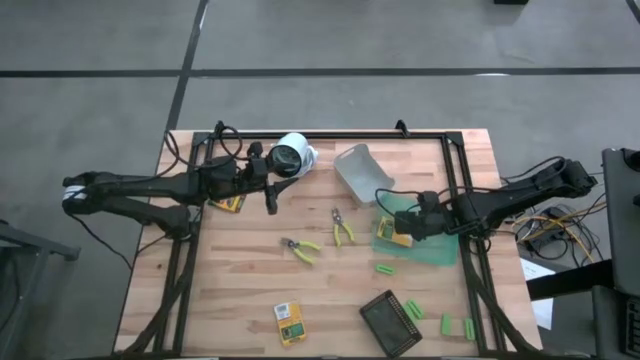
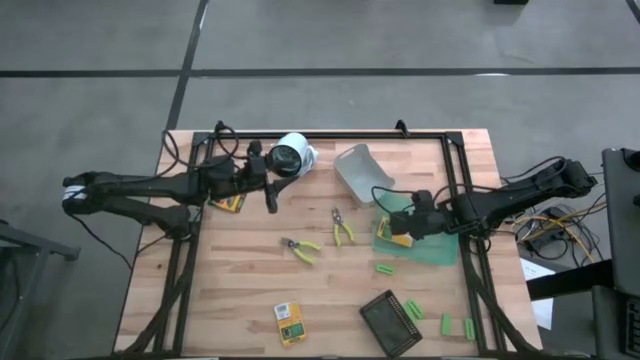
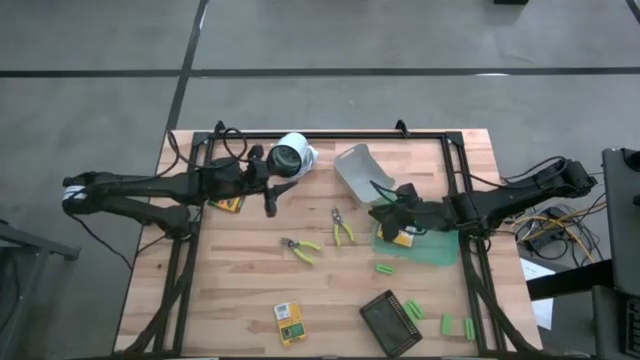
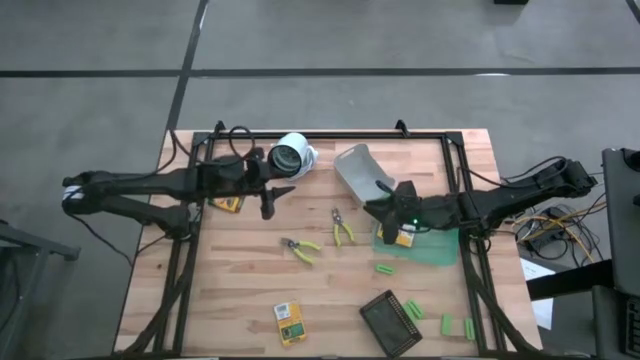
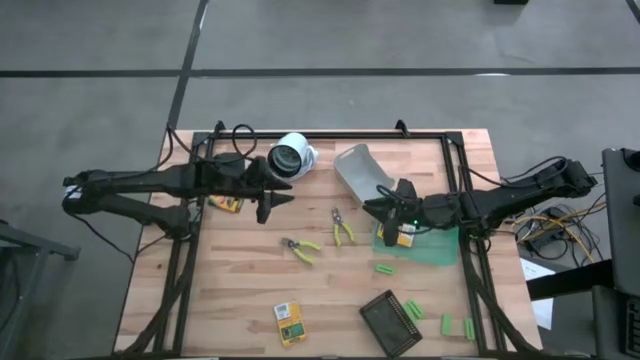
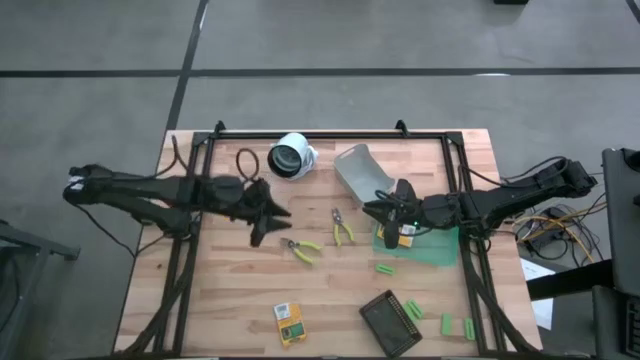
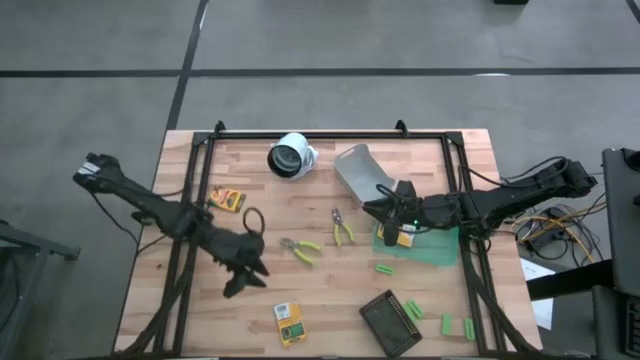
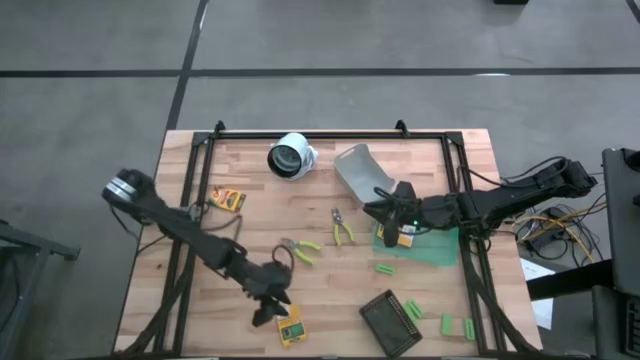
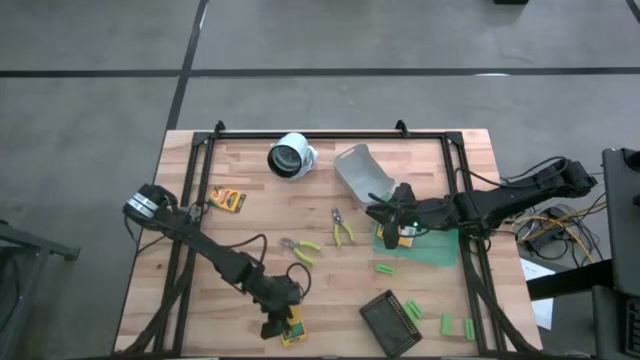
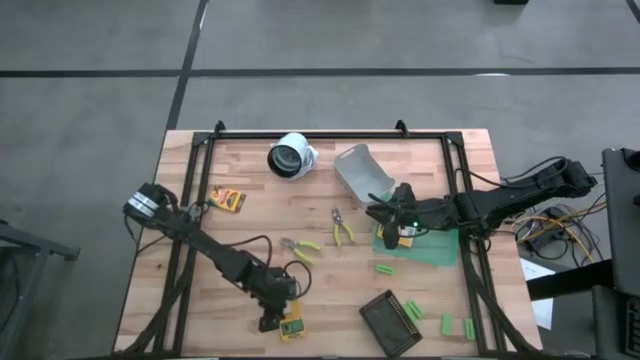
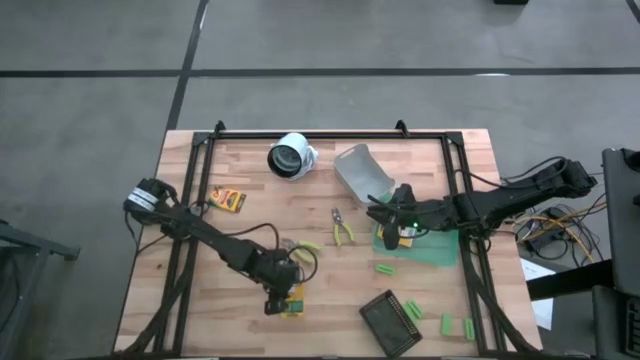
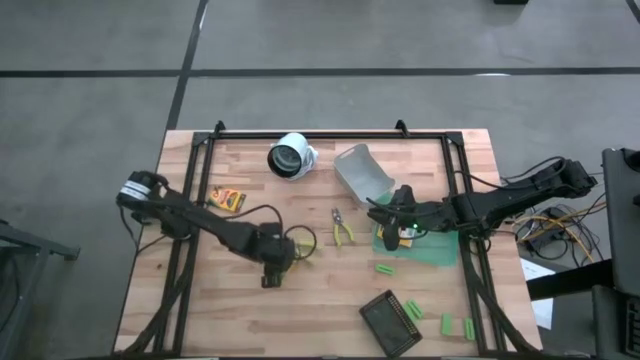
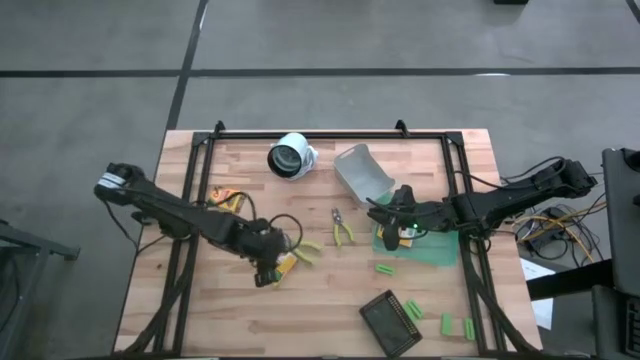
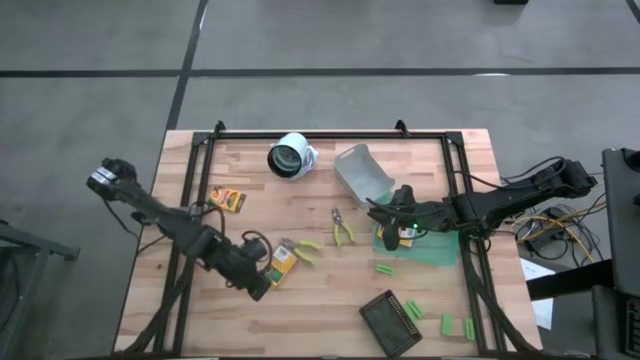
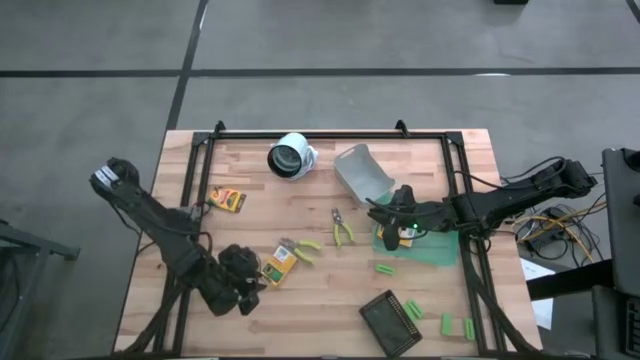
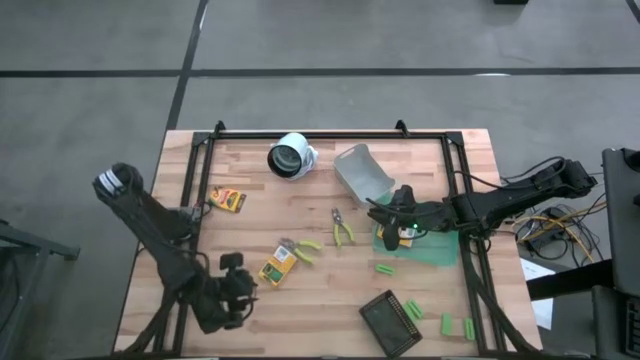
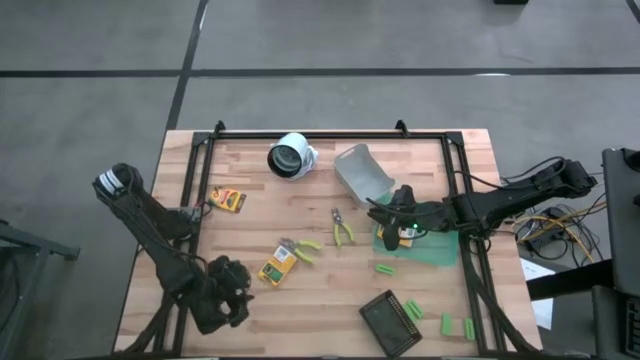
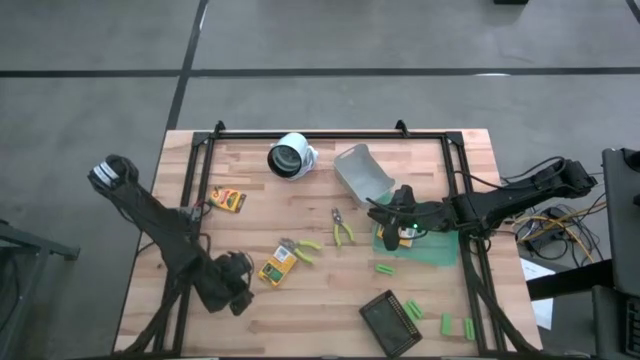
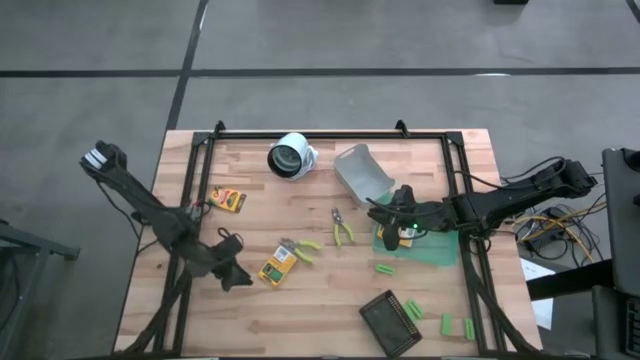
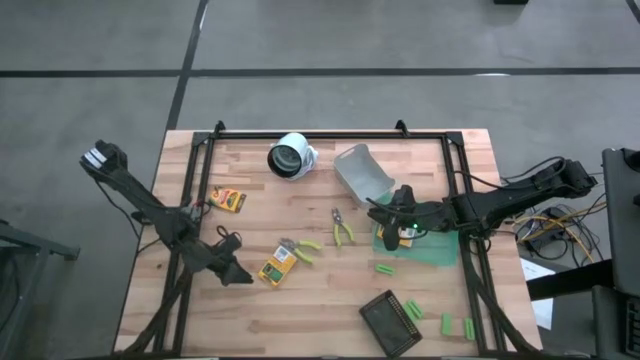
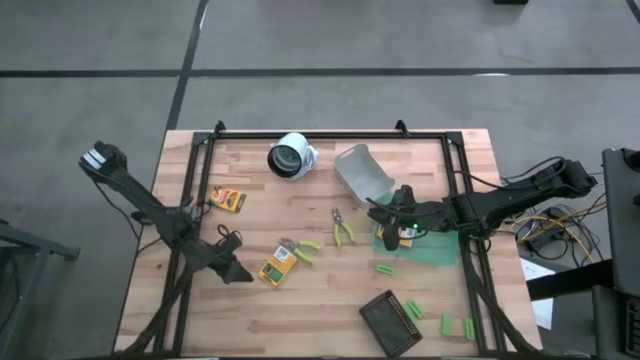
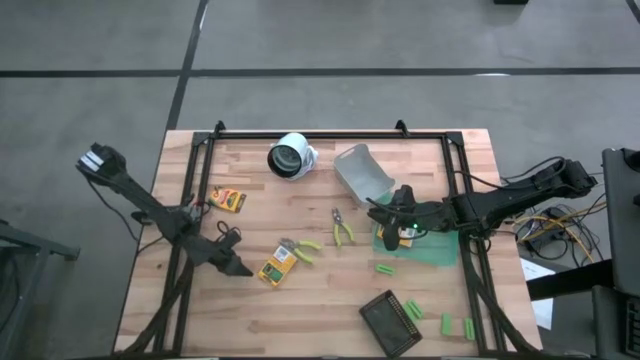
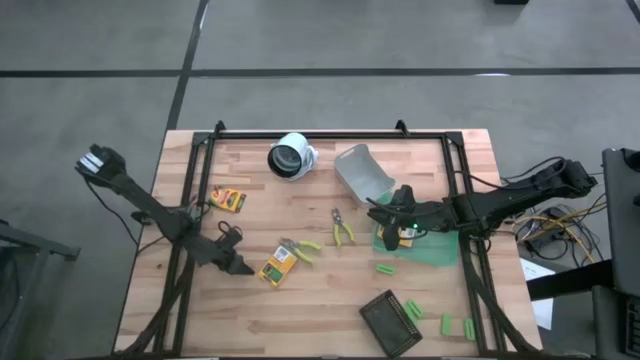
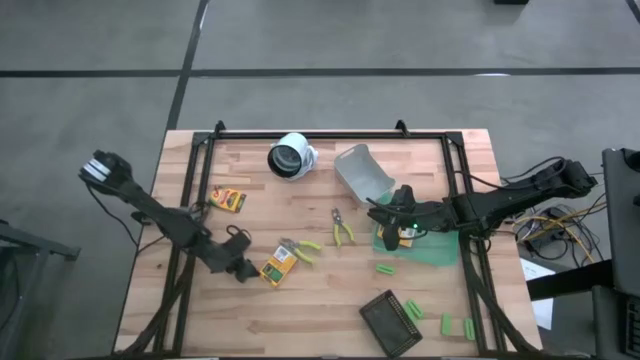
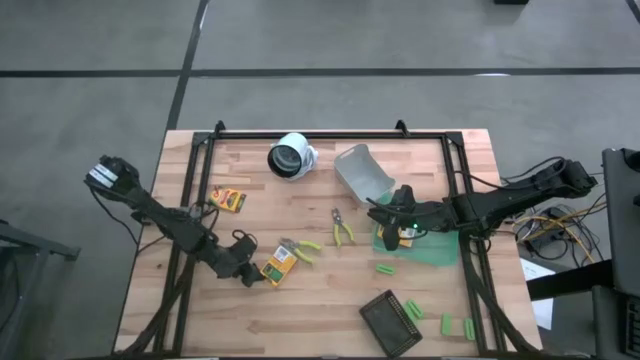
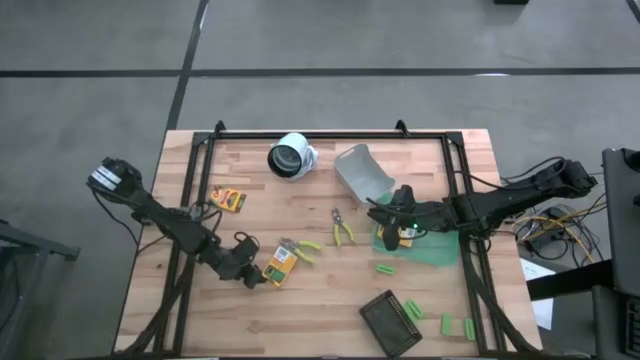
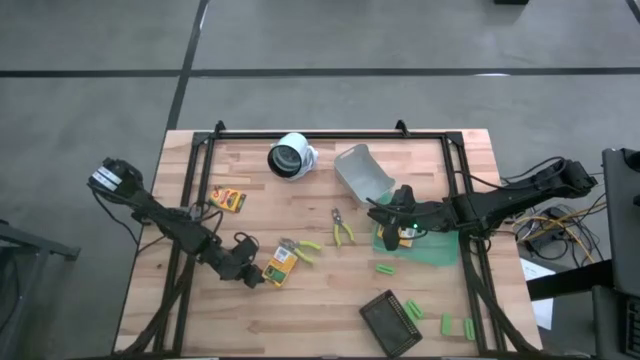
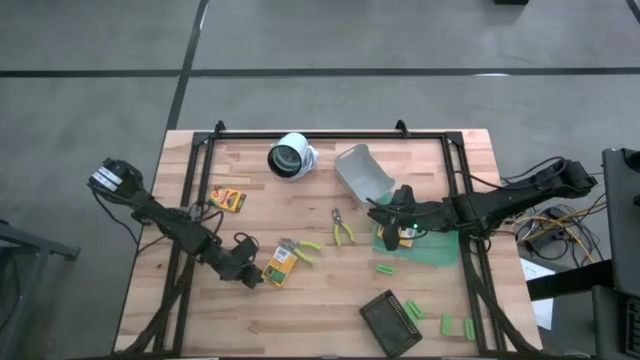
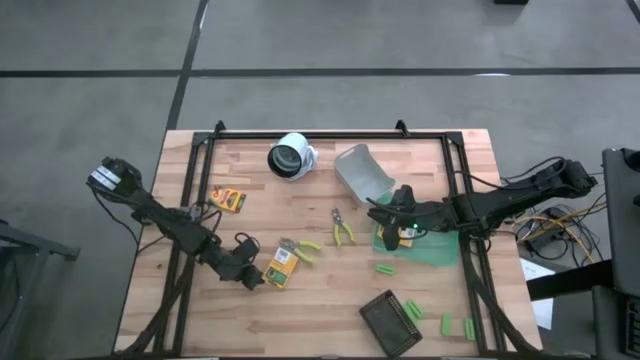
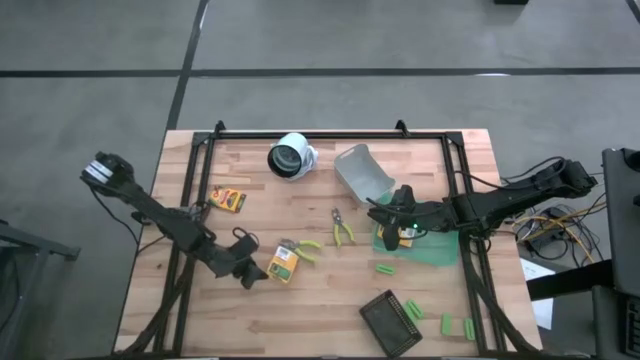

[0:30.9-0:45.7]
Task: Pick & Place School Supplies
Put the yellow crayon box into the green bin

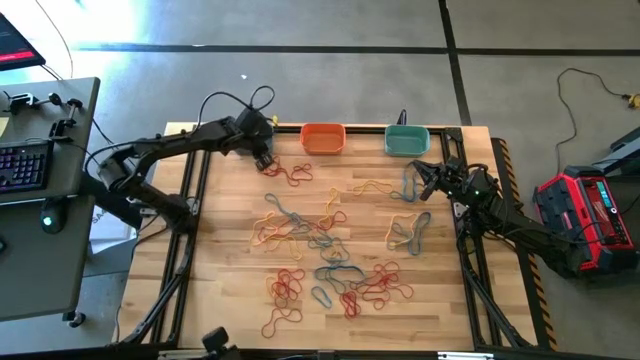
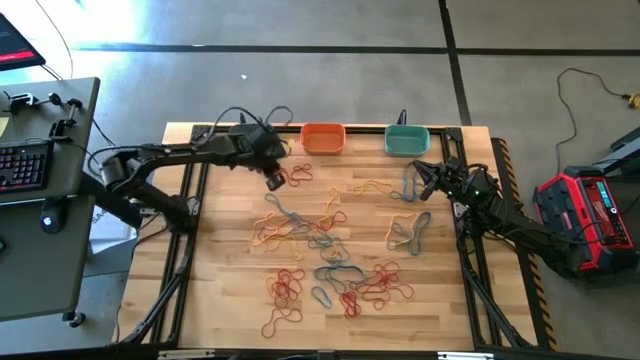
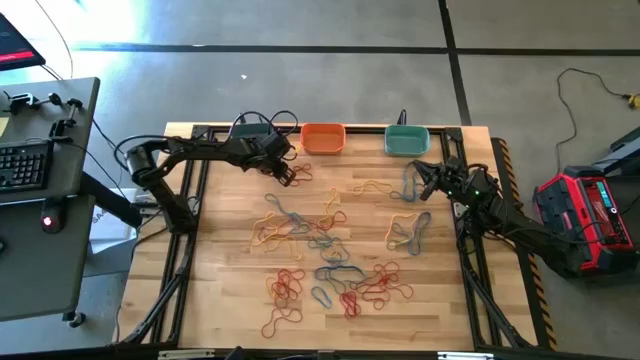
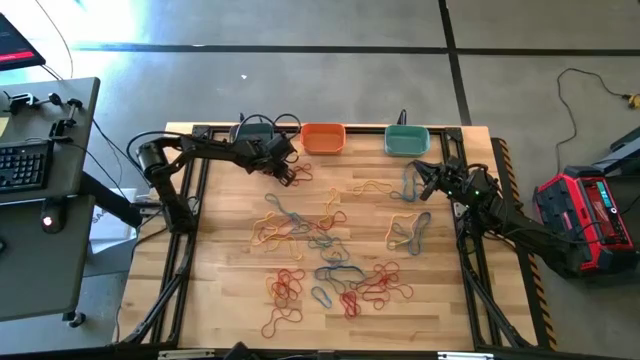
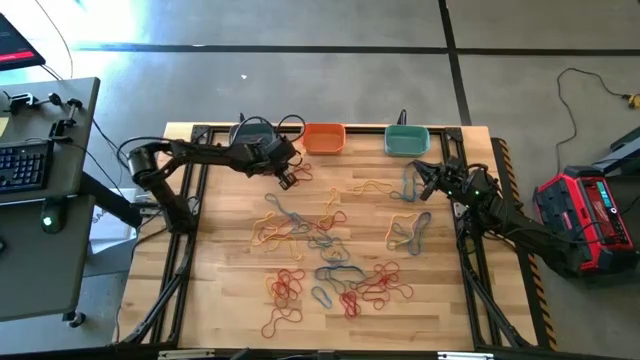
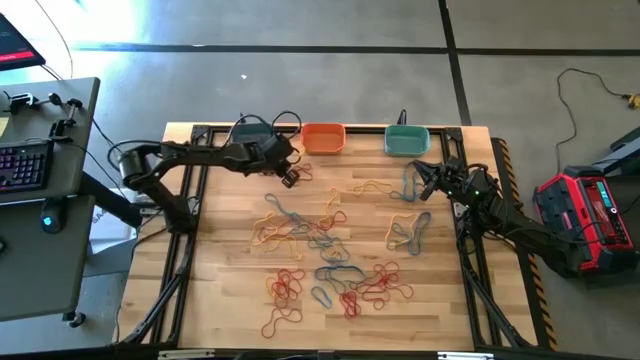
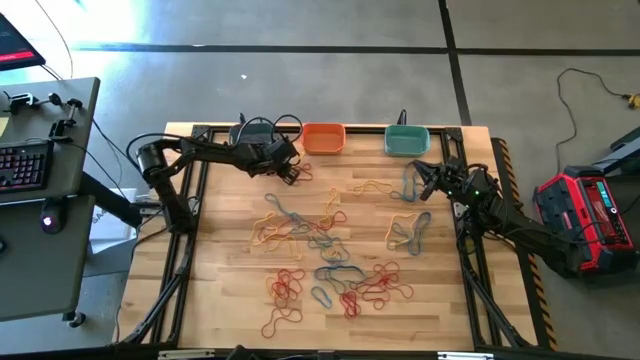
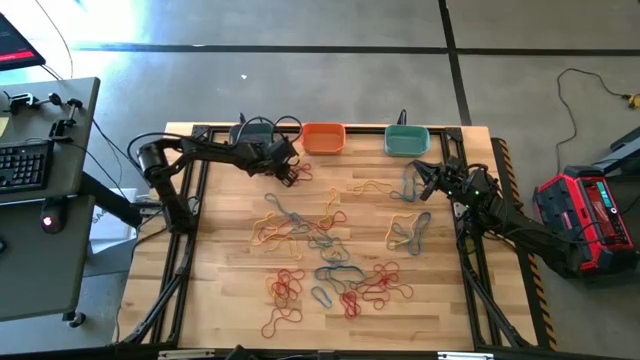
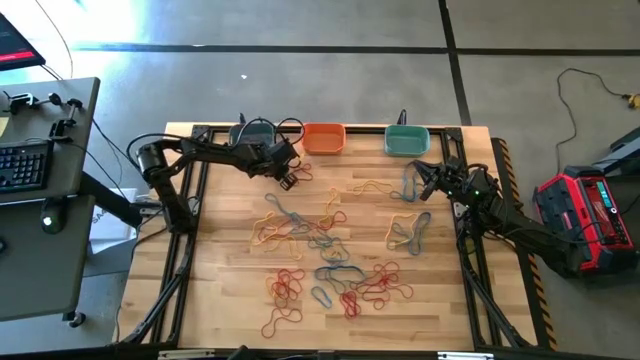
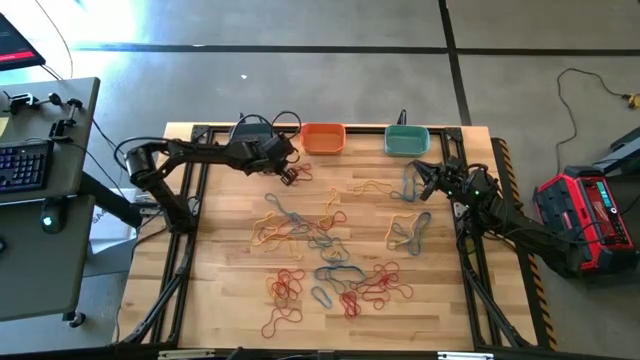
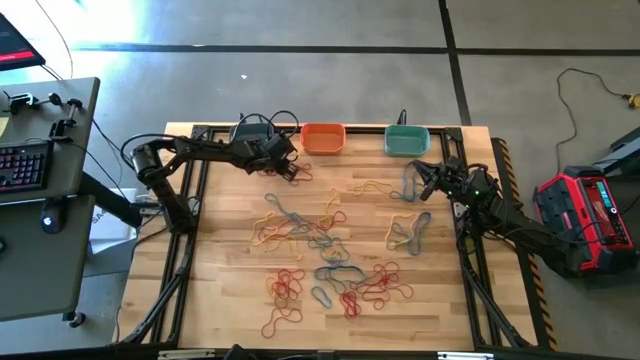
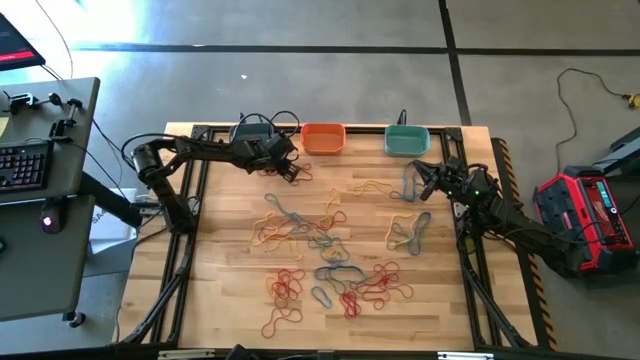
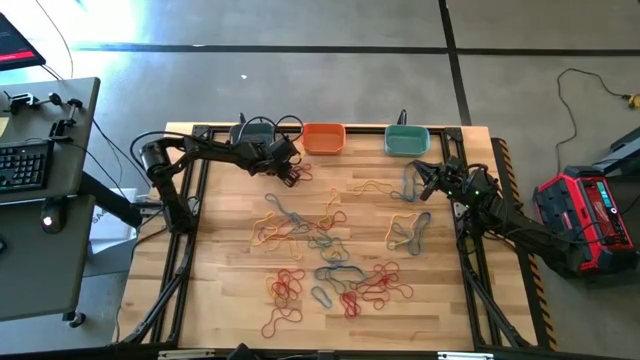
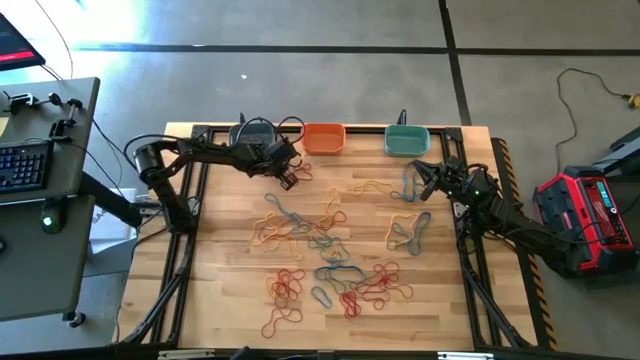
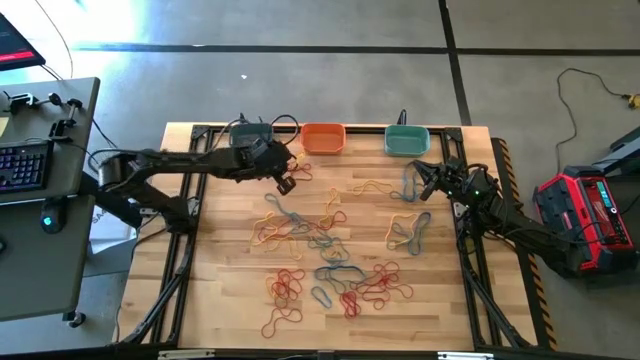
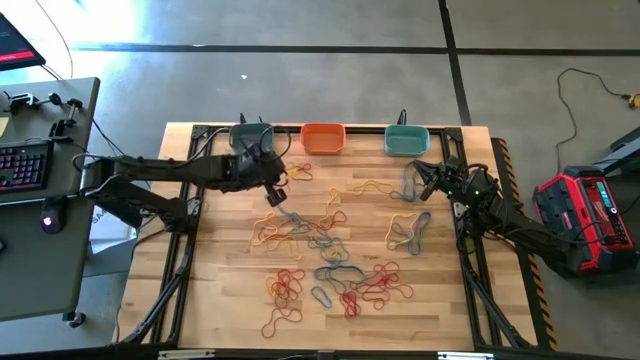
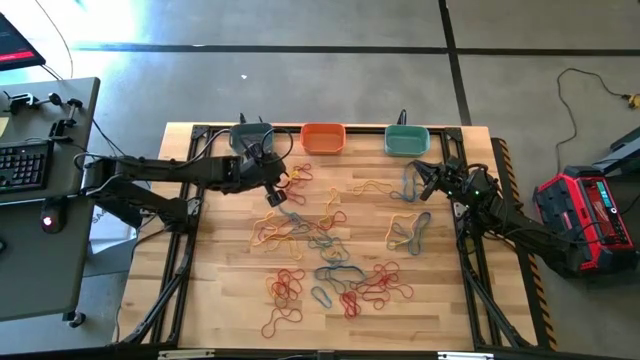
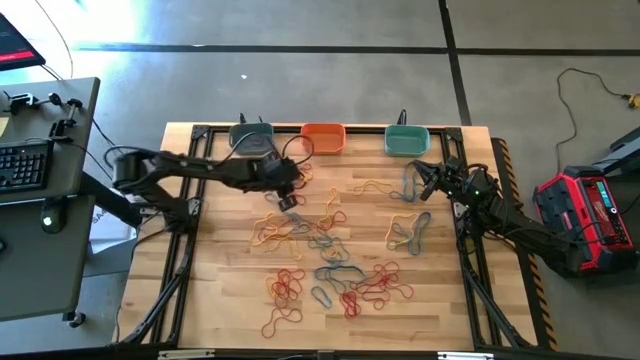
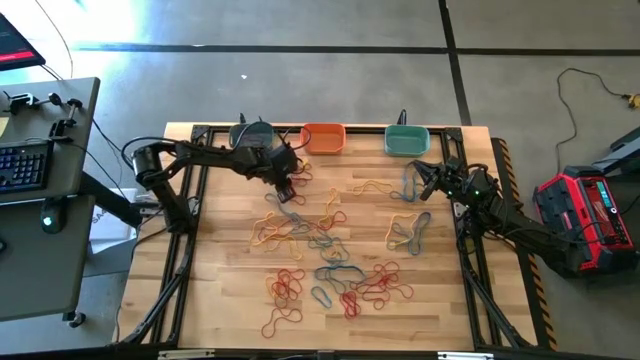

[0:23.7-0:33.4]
Task: Sort rubber bands into baskets
Put the red rubber band into the blue bin
